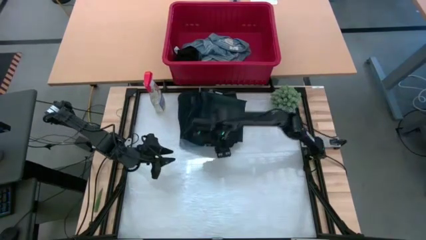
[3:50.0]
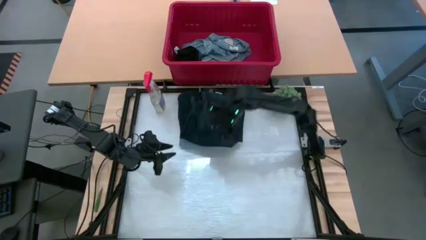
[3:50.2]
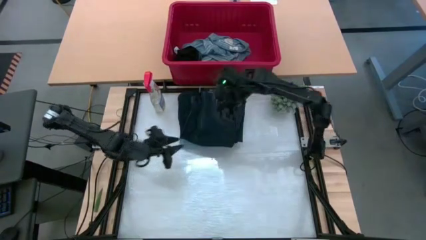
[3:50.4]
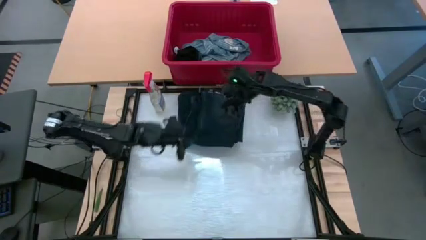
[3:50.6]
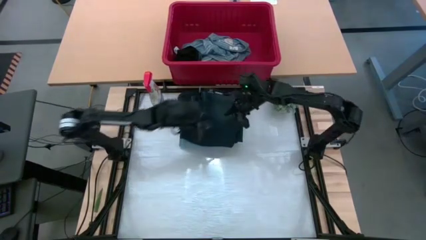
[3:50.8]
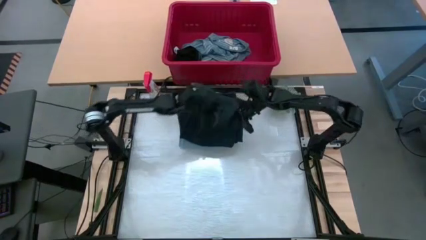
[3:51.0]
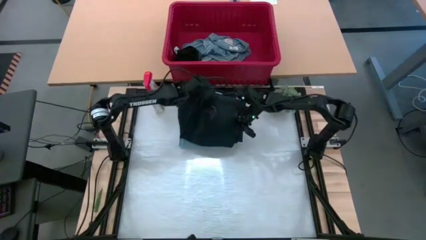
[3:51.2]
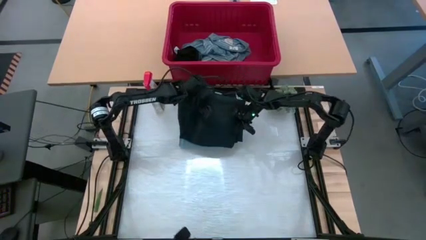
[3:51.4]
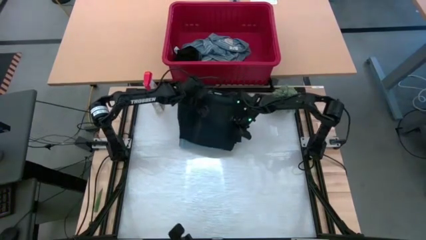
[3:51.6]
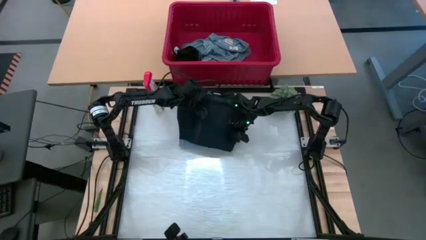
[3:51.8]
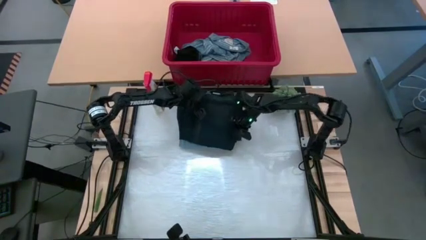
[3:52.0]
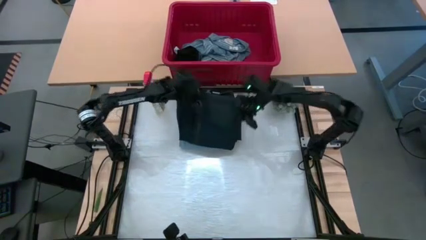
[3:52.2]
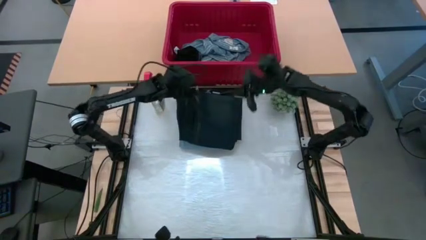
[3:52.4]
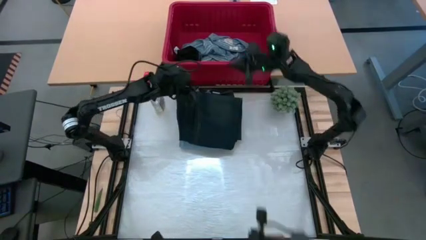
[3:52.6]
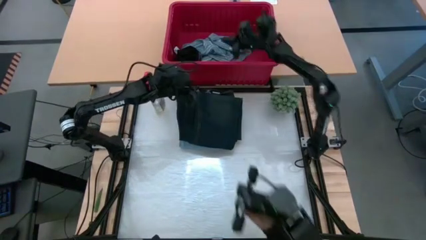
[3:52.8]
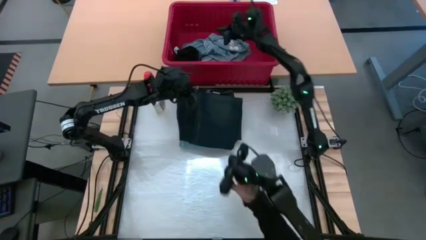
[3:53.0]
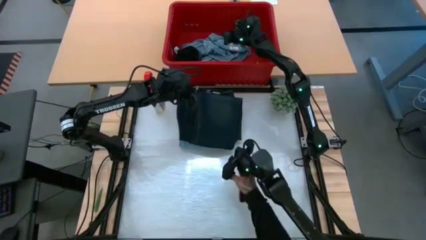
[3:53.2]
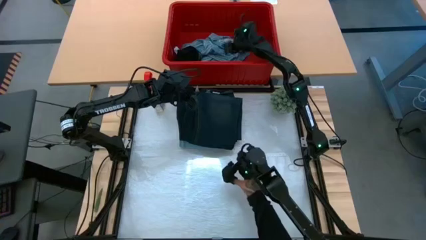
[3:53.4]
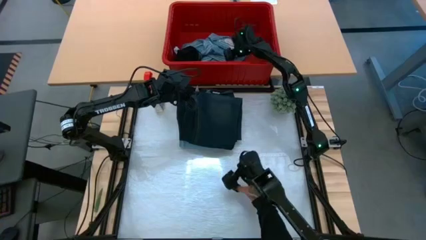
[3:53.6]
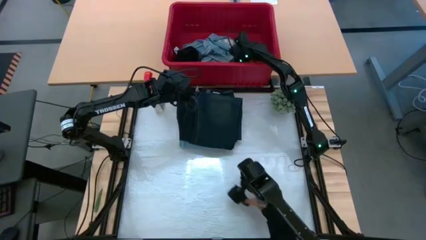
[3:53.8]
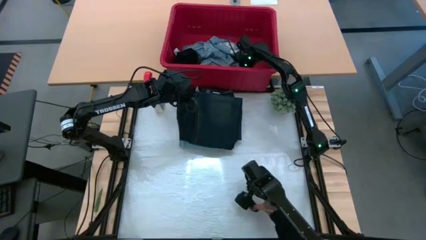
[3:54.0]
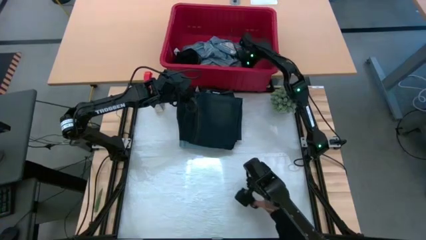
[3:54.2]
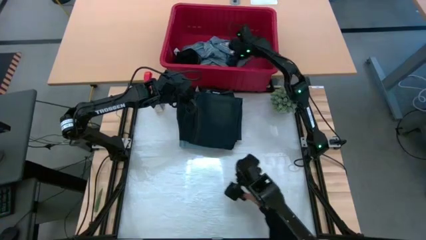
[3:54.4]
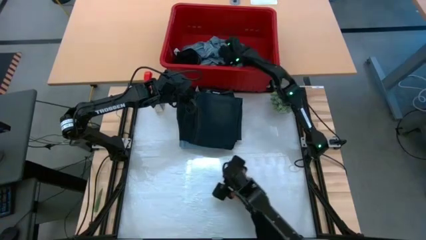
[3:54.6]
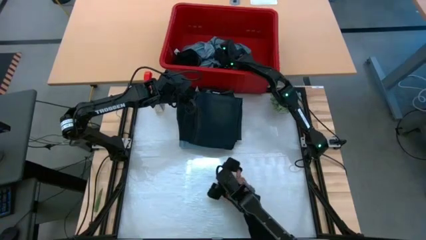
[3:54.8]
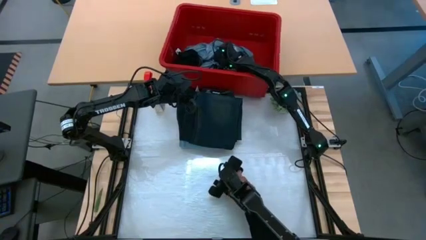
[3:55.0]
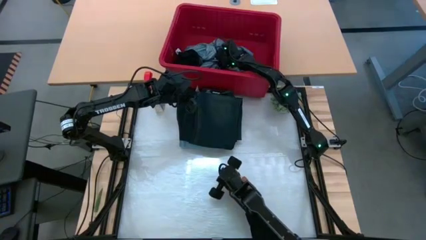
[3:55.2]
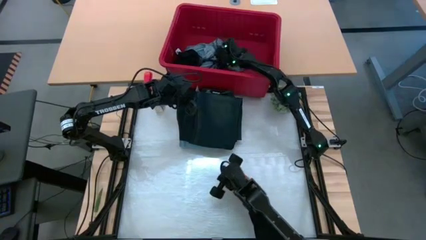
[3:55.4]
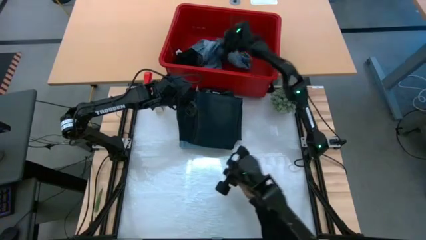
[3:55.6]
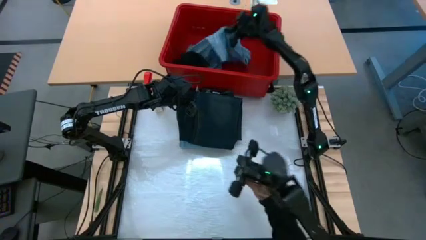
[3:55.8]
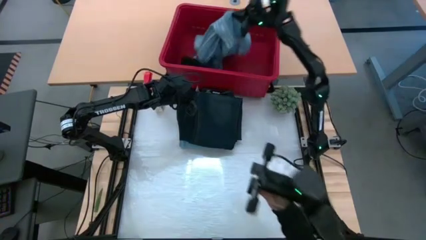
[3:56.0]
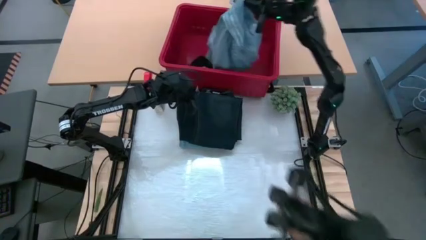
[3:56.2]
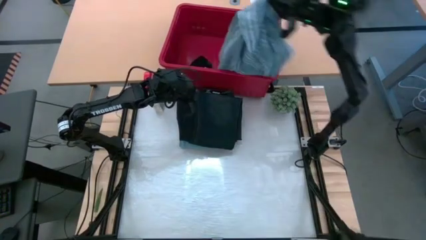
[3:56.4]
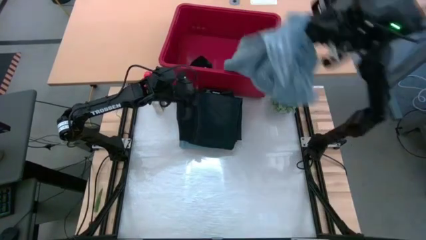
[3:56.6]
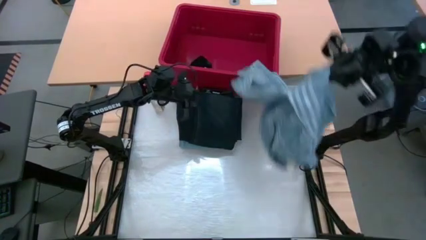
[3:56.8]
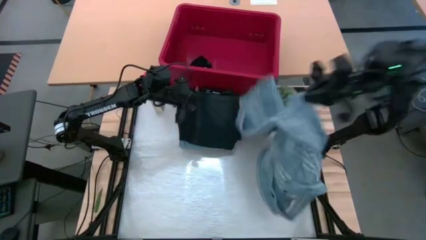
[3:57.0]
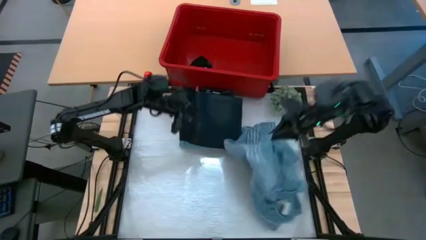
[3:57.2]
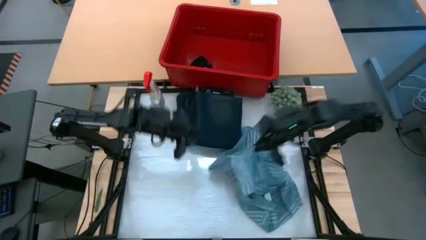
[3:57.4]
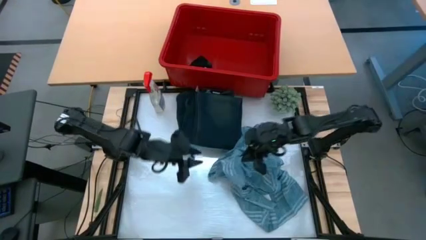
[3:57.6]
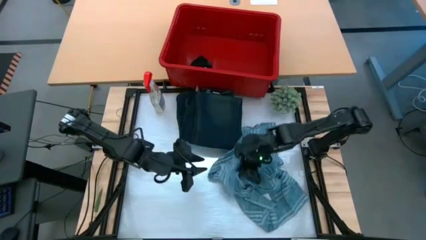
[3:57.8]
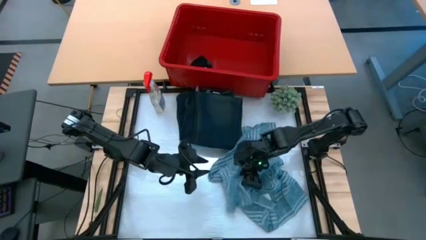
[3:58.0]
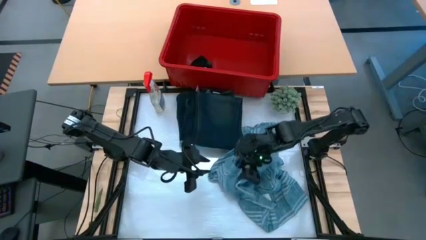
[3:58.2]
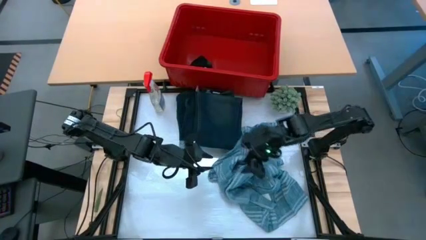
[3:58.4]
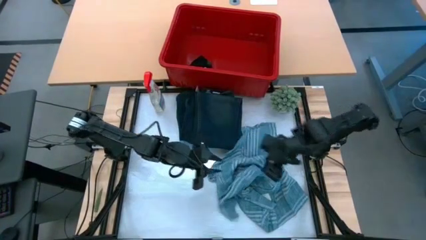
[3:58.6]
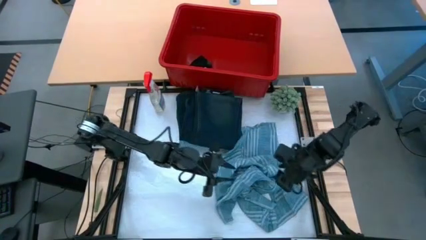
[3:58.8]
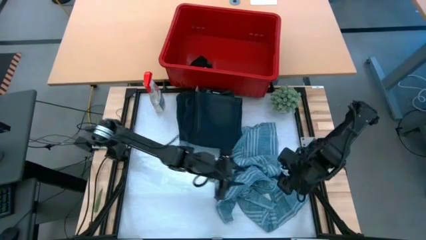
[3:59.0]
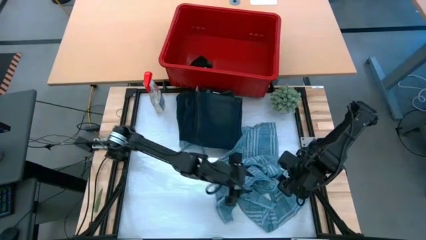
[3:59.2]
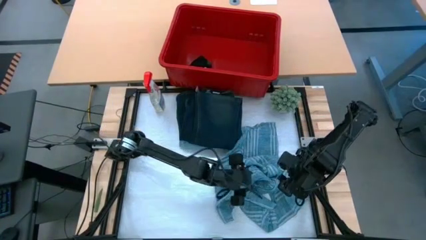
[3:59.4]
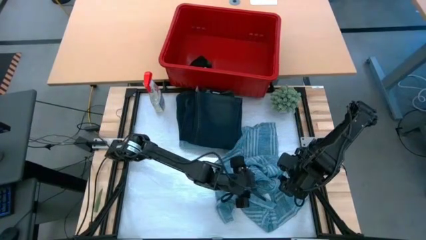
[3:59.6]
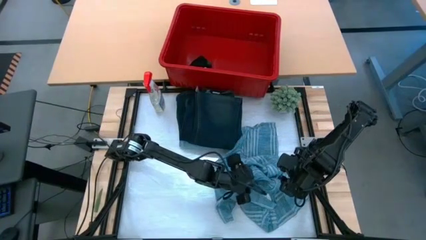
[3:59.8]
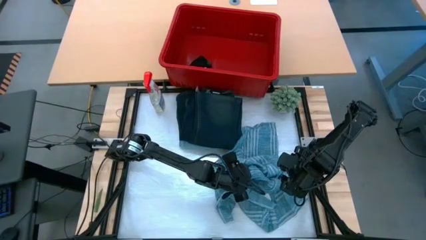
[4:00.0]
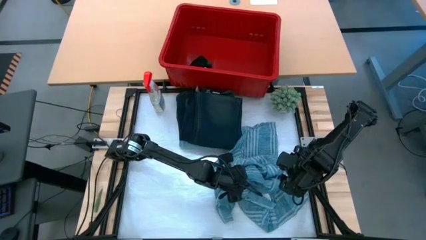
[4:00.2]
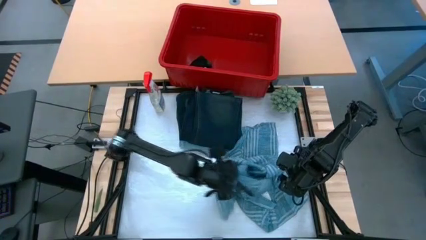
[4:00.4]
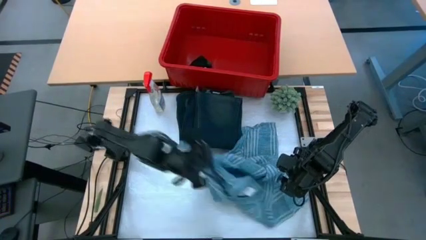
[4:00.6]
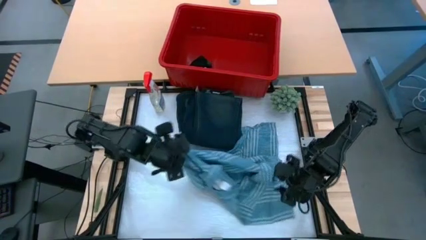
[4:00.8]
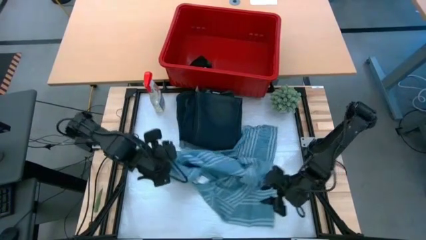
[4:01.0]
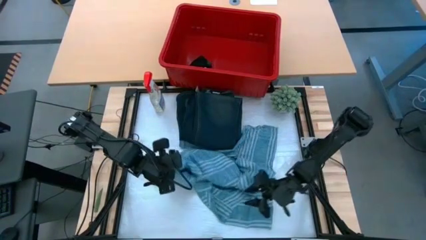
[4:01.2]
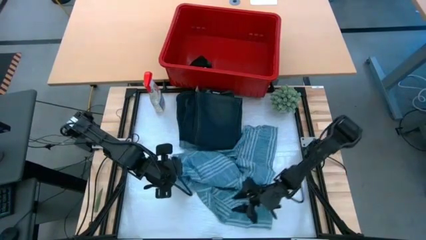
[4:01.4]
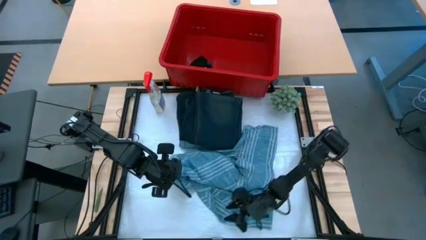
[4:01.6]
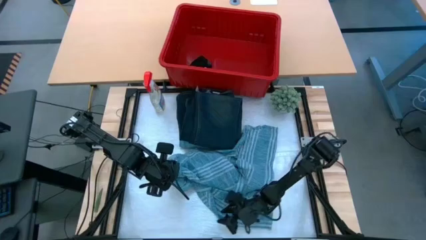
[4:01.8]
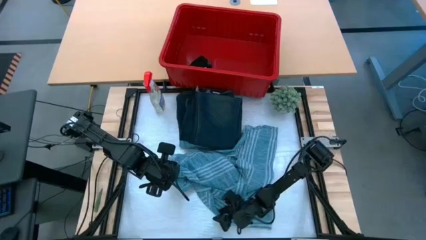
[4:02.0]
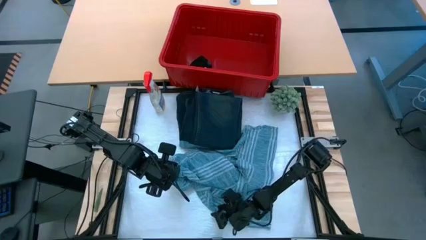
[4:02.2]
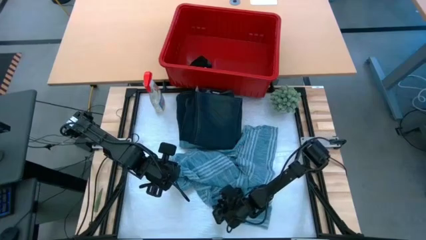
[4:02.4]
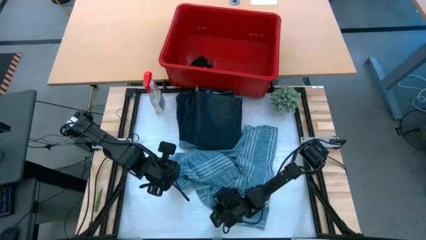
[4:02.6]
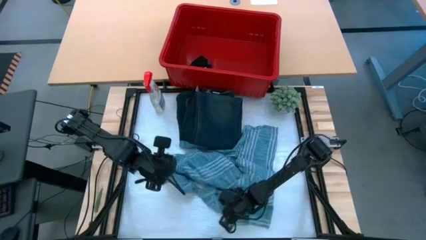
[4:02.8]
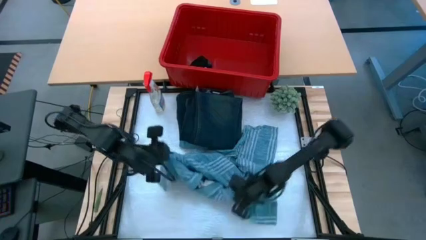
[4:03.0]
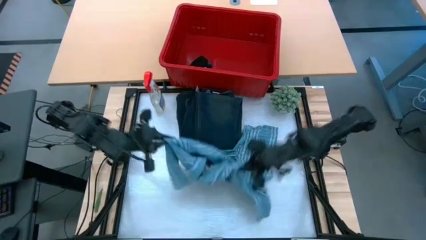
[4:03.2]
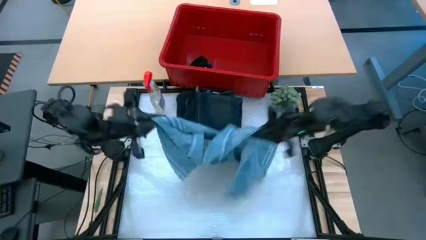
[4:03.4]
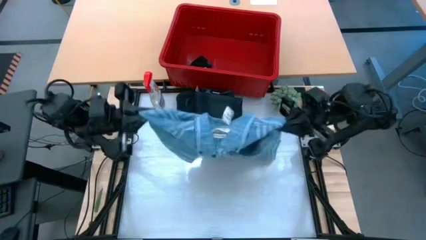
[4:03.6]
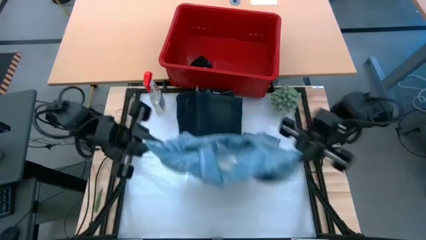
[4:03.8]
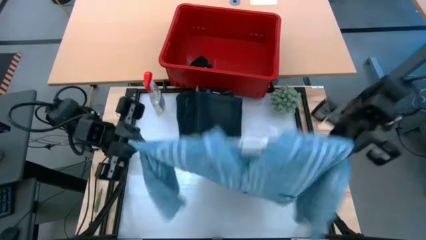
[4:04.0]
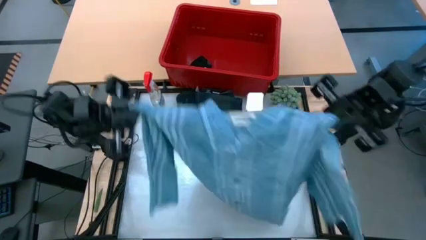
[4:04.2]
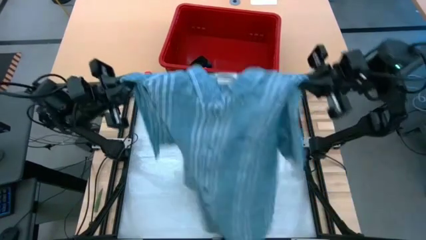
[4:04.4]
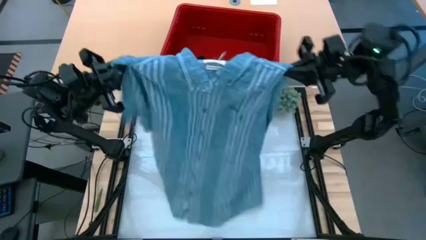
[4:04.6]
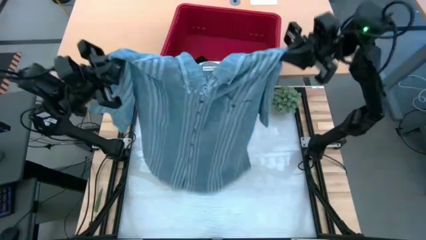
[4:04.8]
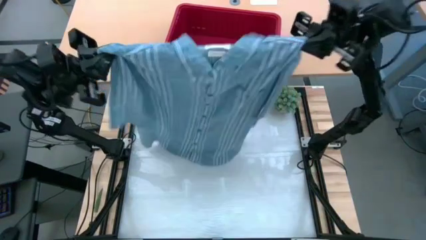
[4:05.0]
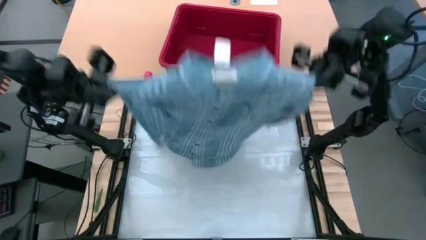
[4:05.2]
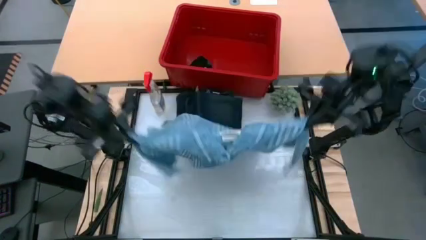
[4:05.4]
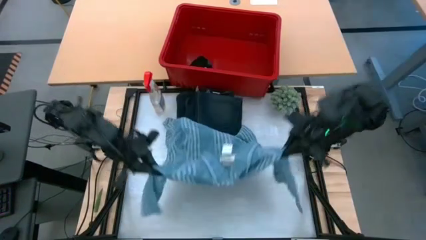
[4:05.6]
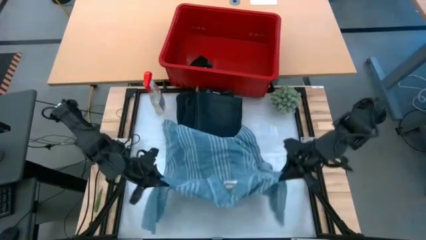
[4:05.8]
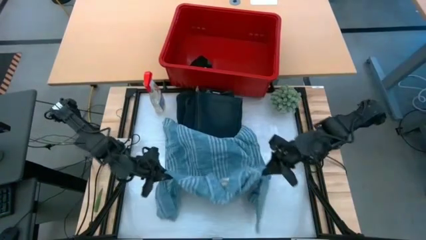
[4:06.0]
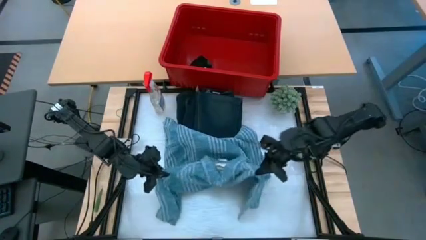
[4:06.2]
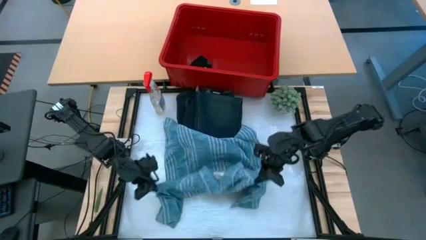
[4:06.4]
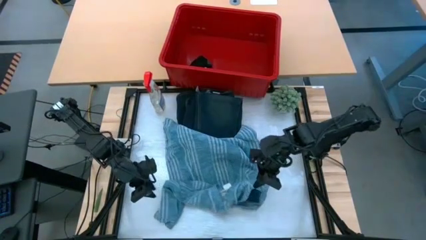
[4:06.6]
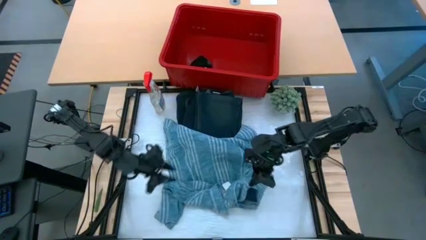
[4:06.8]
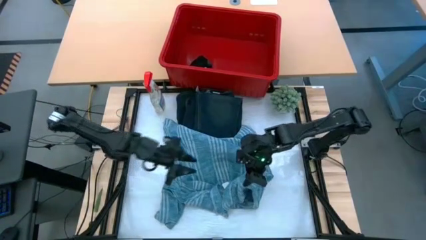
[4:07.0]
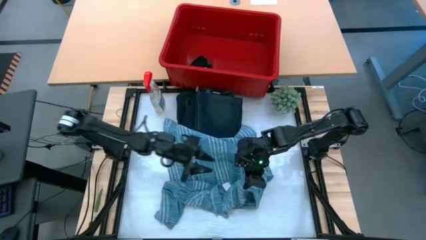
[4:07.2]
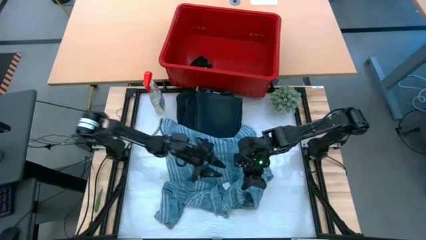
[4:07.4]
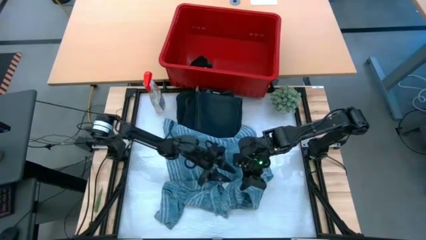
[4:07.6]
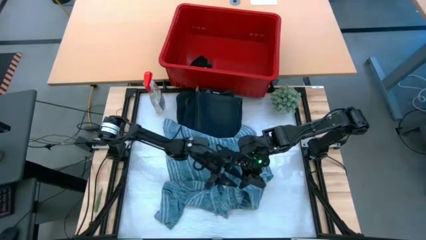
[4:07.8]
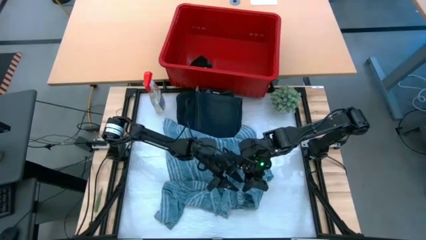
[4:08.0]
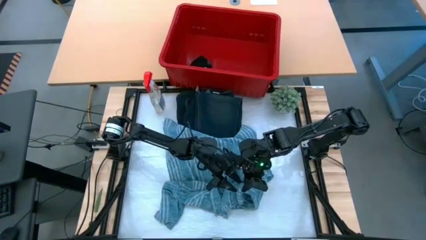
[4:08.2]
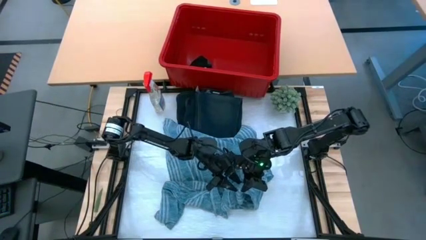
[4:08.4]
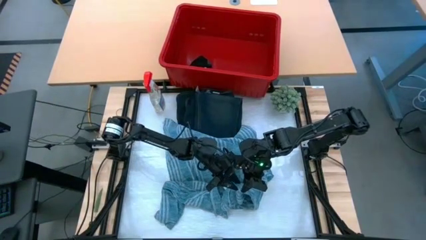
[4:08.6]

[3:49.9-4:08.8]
Task: Fold Laundry from Bin
Fold the blue long sleeve on the table
